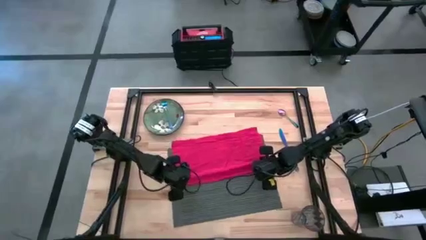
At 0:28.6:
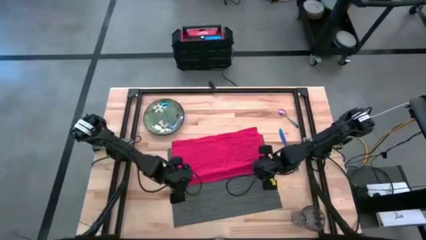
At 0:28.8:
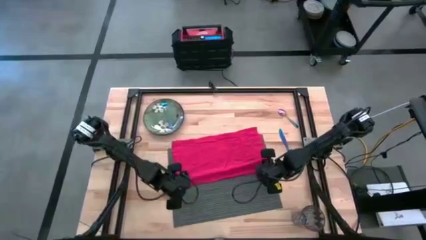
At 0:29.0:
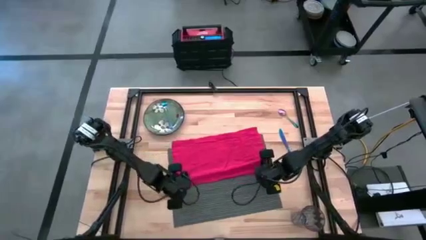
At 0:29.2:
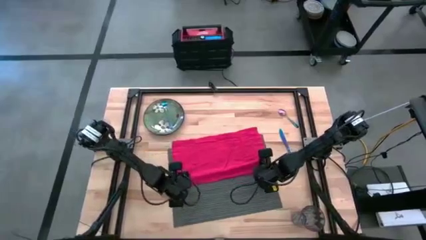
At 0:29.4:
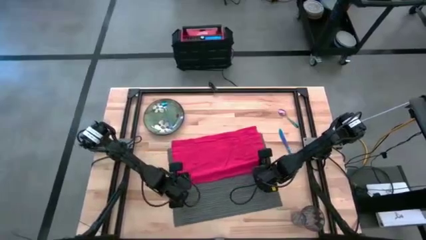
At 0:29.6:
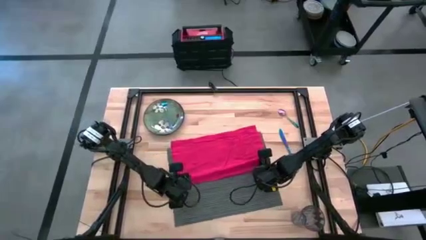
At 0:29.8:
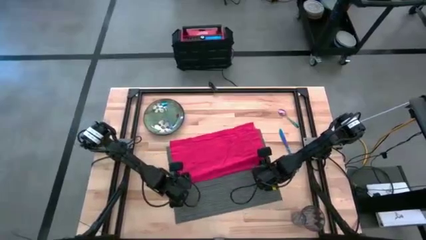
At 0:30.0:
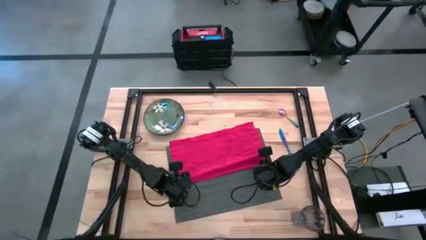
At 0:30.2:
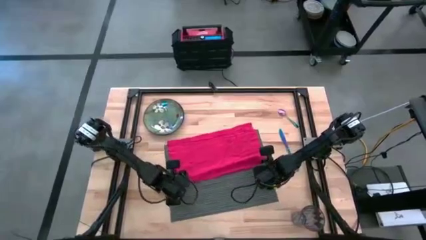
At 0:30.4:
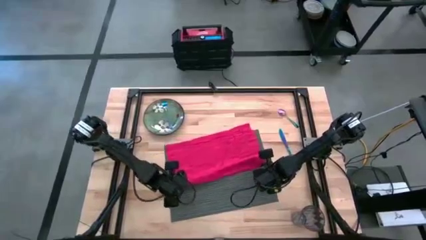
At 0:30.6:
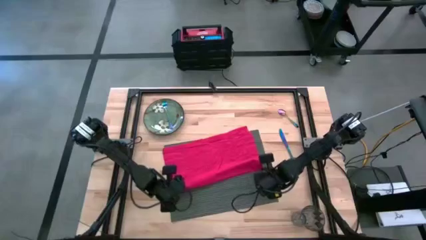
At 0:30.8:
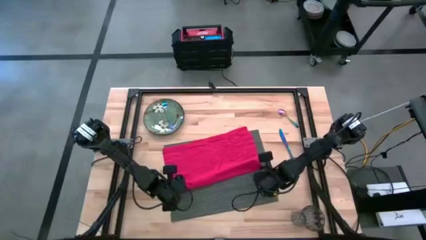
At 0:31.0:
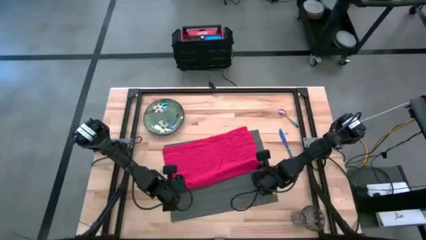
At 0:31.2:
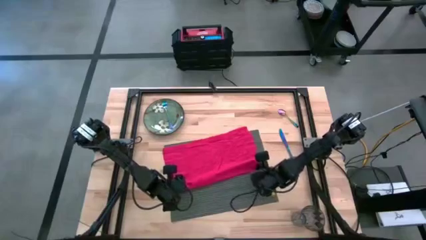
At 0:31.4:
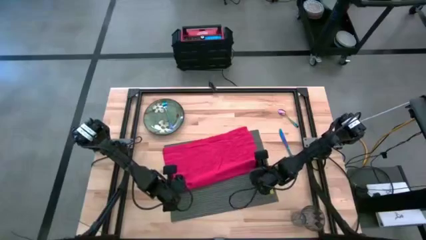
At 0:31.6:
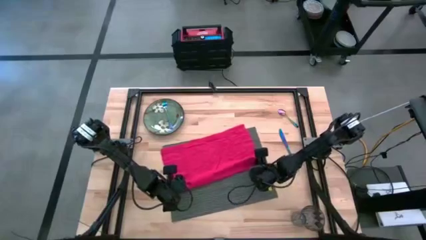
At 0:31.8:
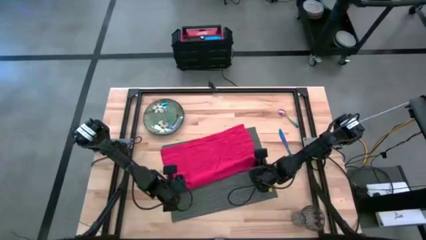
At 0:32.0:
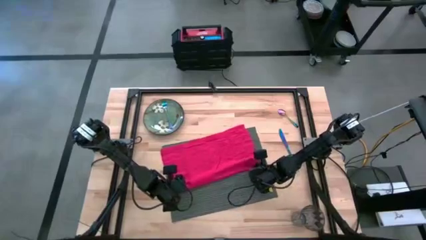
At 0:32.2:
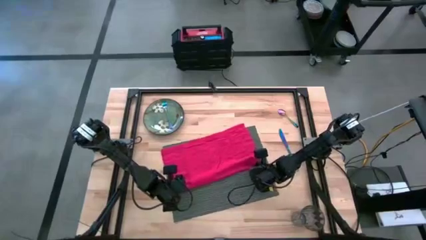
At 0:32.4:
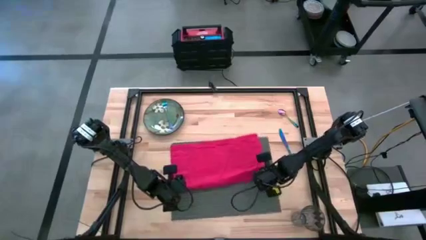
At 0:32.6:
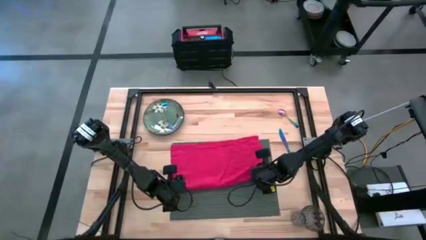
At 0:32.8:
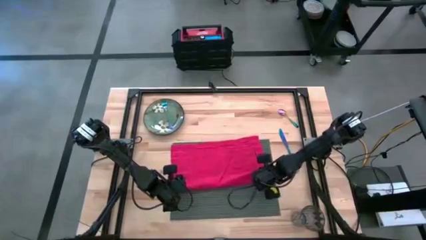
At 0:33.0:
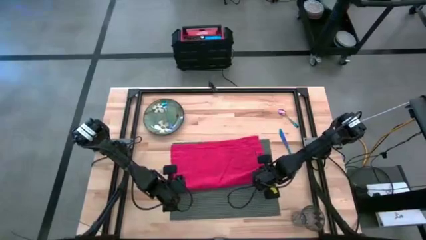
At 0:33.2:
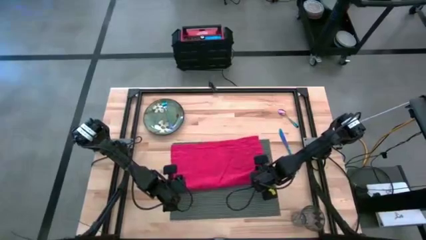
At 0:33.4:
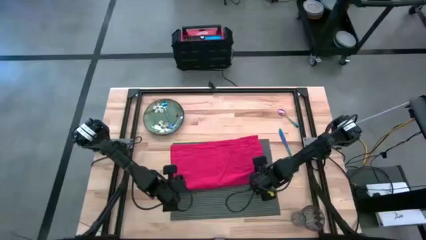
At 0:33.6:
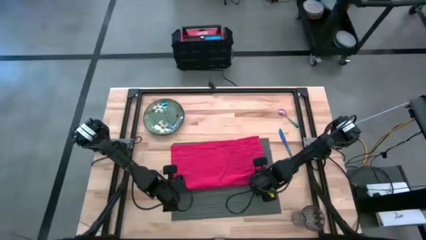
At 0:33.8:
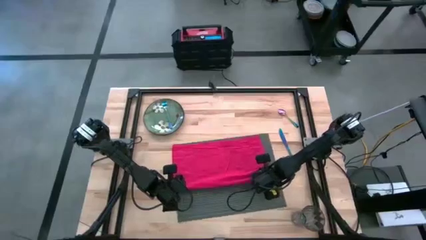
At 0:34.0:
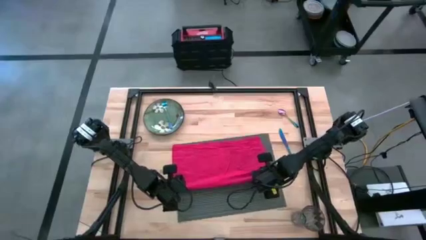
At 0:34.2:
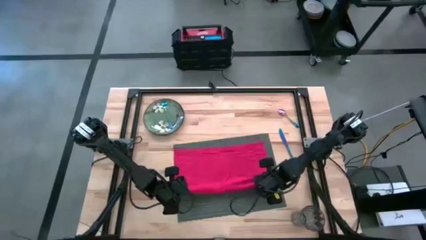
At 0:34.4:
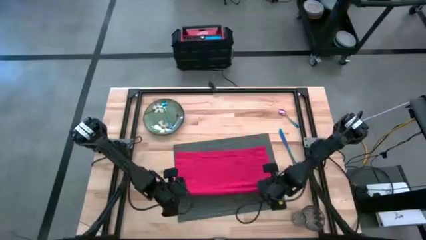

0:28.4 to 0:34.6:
Task: Set table place
Fold the red table napkin

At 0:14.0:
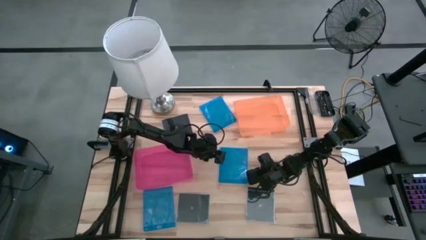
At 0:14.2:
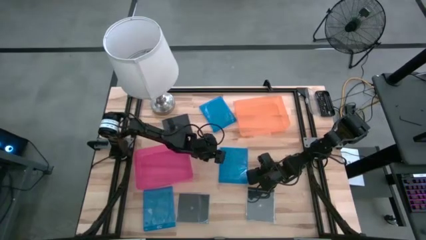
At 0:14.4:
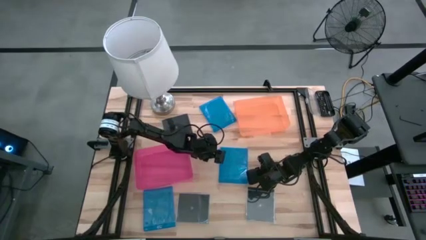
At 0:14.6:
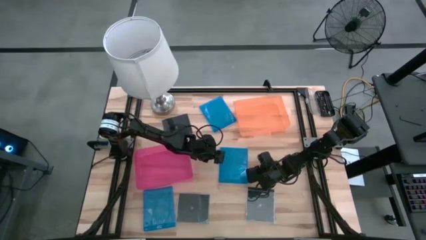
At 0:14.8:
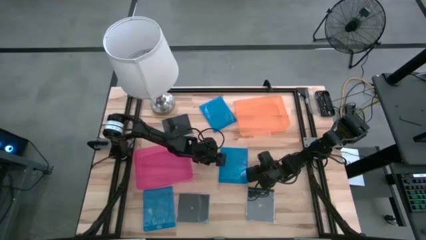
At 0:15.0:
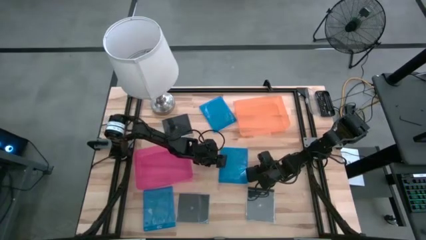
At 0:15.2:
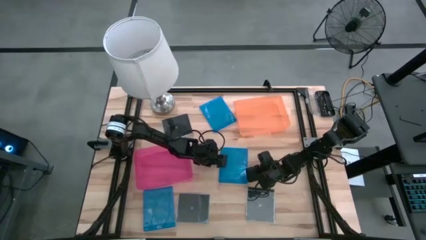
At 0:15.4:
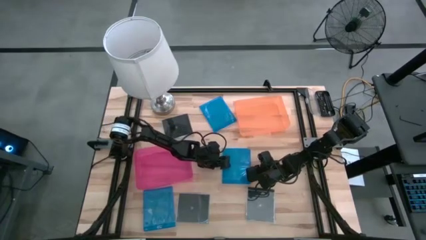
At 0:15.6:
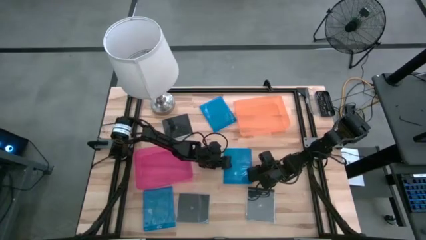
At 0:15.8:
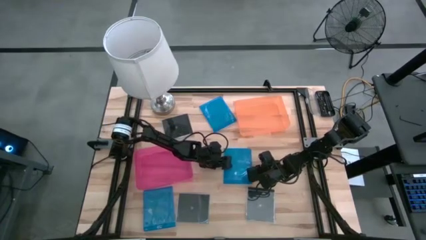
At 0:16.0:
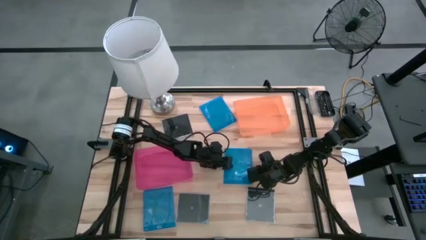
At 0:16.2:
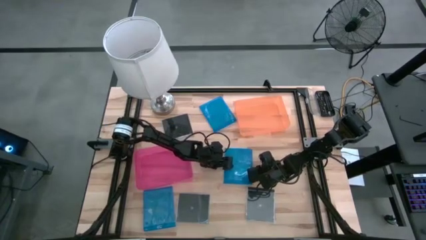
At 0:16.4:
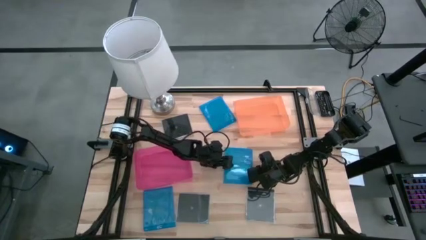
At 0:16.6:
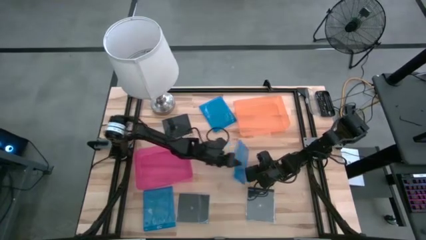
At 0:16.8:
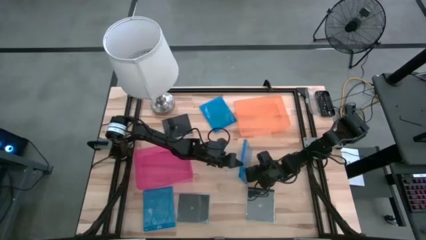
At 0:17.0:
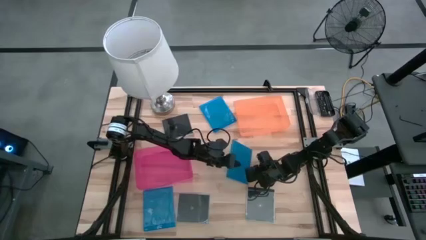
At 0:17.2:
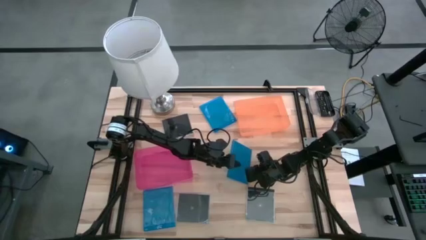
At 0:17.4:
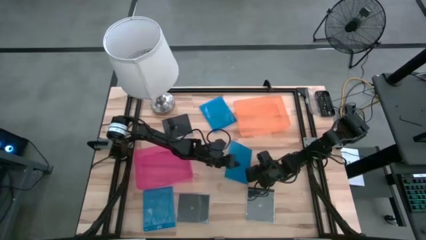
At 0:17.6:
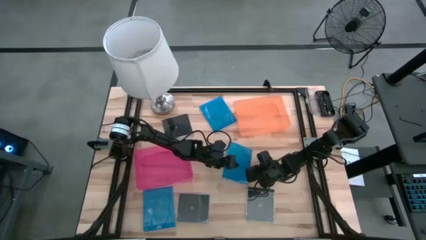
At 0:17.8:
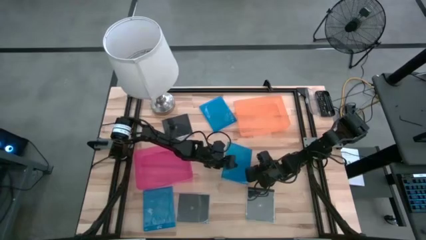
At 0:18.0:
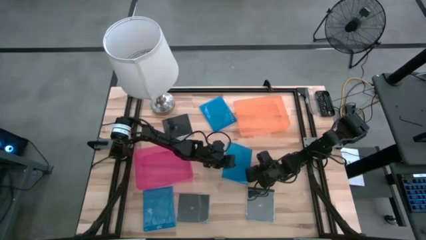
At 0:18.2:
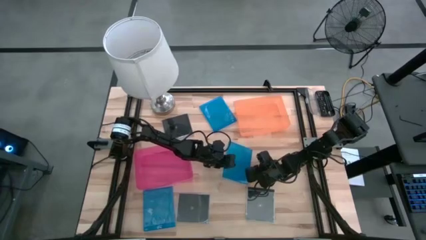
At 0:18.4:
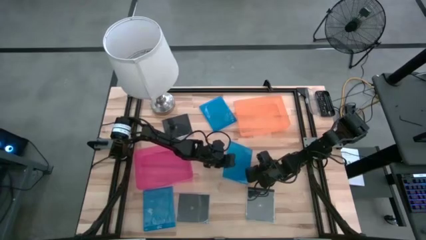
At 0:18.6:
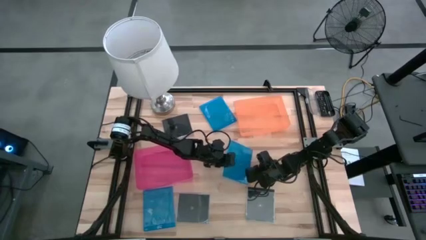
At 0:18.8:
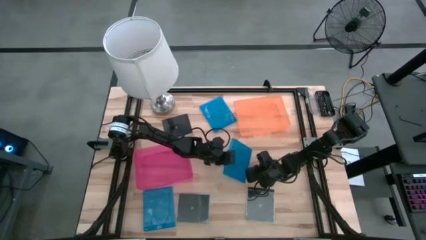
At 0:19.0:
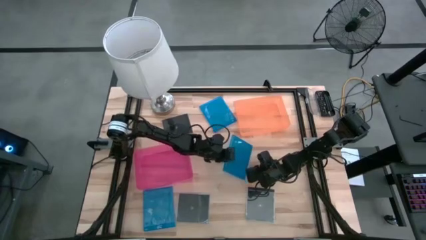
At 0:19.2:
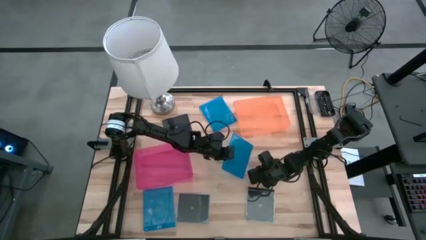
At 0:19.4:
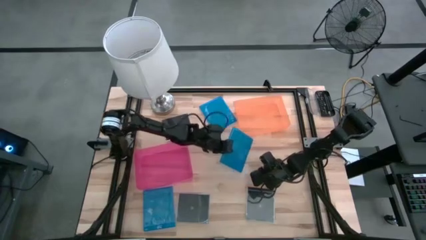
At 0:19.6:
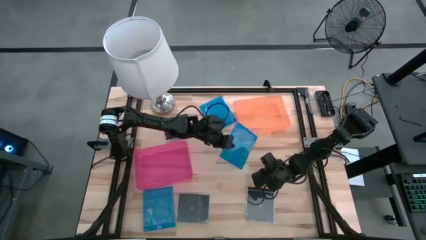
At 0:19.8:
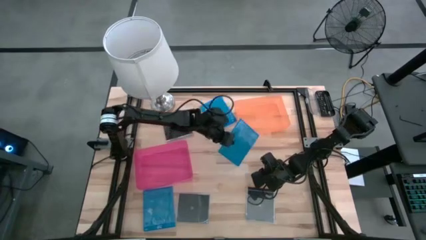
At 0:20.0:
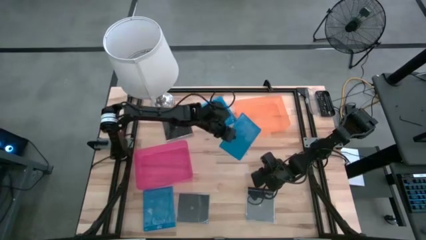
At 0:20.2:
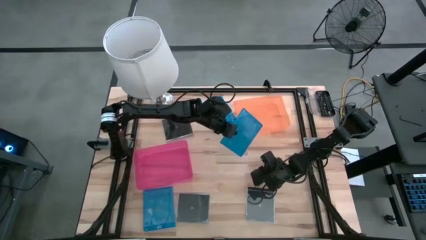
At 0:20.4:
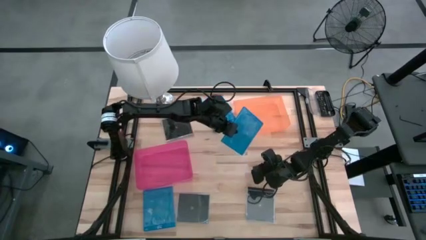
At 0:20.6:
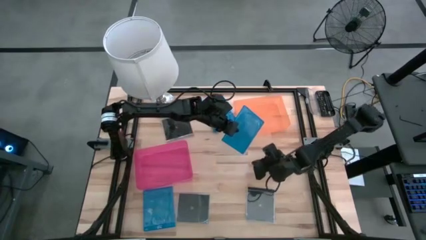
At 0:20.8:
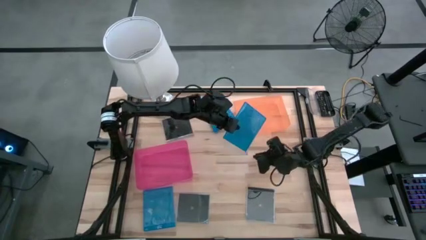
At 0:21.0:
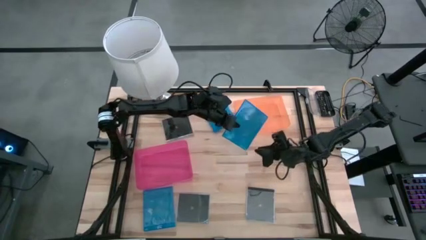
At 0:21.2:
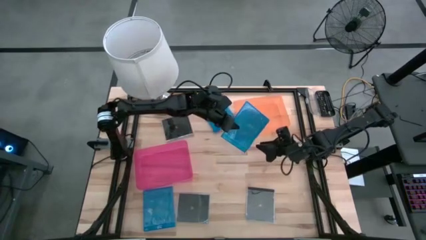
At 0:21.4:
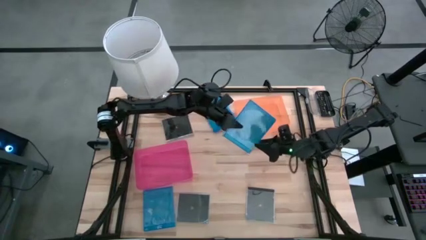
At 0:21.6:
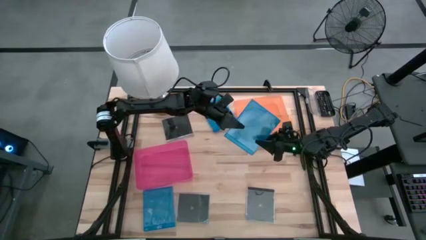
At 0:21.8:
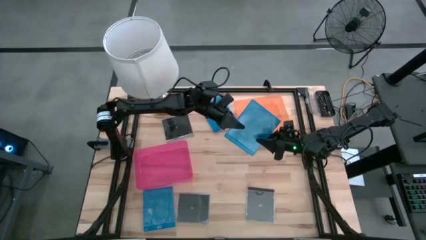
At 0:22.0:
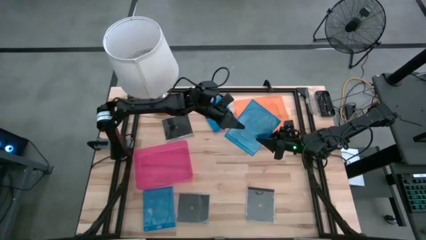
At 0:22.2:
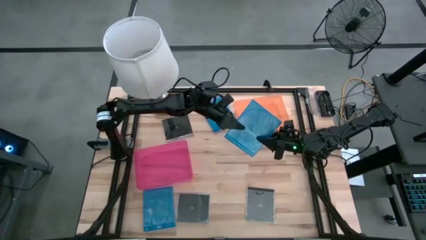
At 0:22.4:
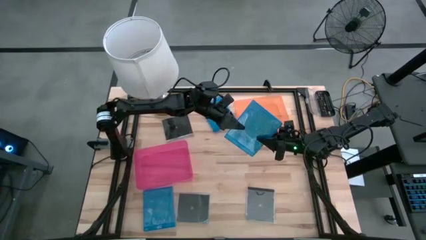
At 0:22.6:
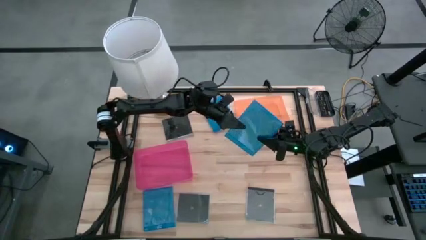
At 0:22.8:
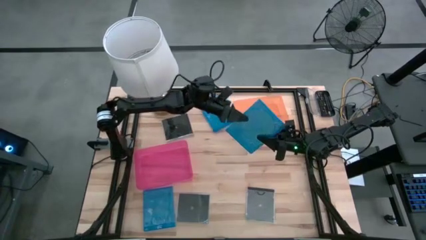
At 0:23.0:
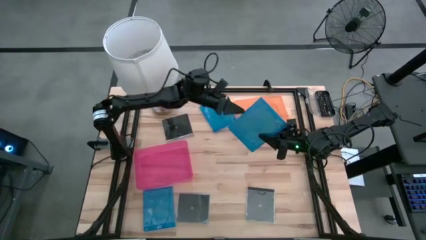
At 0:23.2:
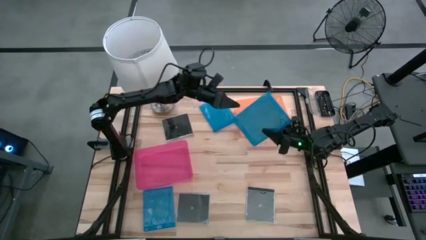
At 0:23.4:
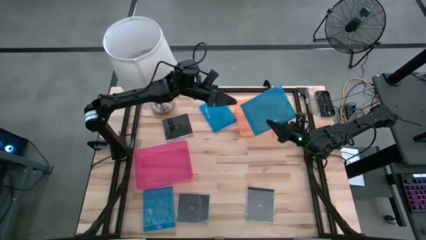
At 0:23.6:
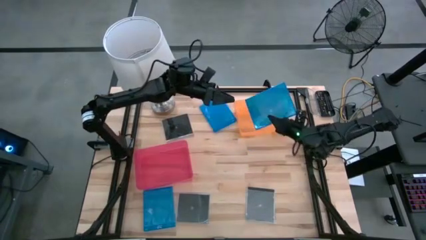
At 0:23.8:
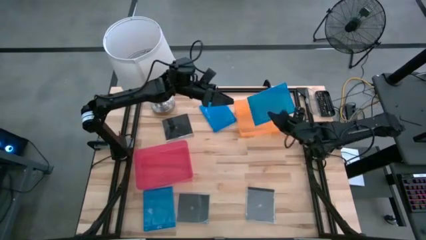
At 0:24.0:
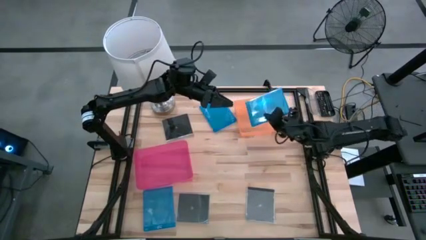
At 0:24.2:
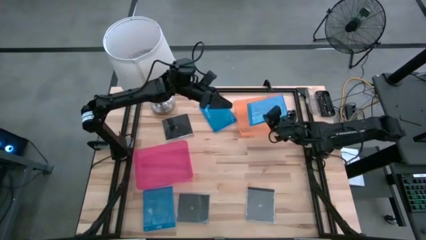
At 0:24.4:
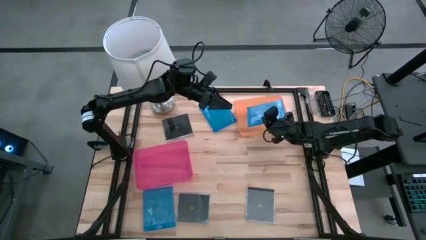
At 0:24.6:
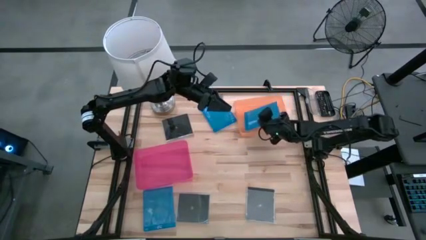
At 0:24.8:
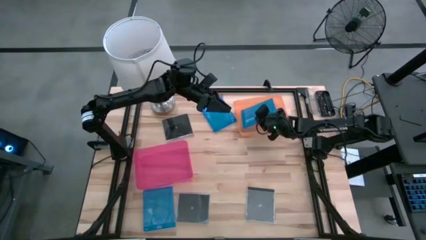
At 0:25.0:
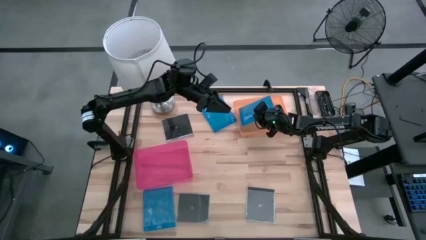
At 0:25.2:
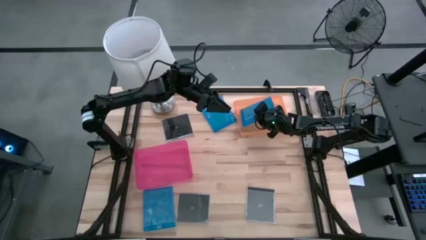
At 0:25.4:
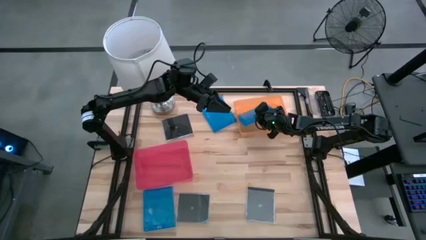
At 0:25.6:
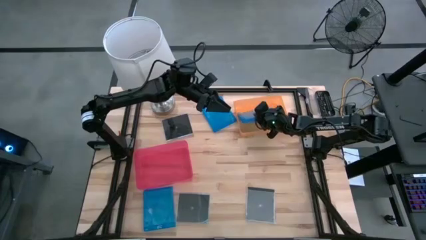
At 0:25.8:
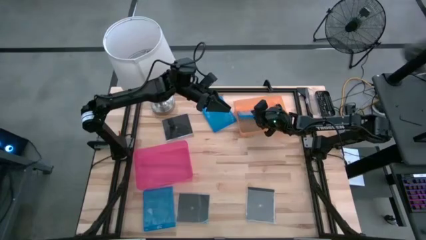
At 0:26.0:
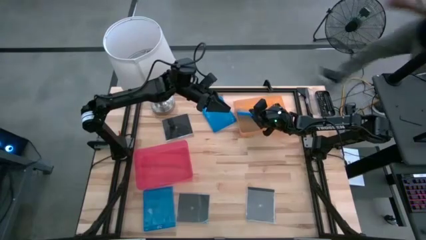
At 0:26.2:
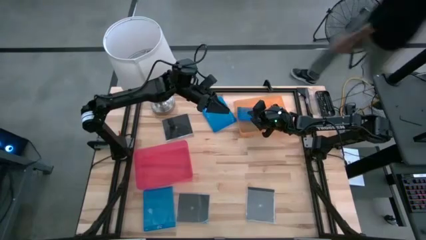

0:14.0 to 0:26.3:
Task: Pick & place jewel cases by type
Put the bottom right blue CD case into the orange bin
